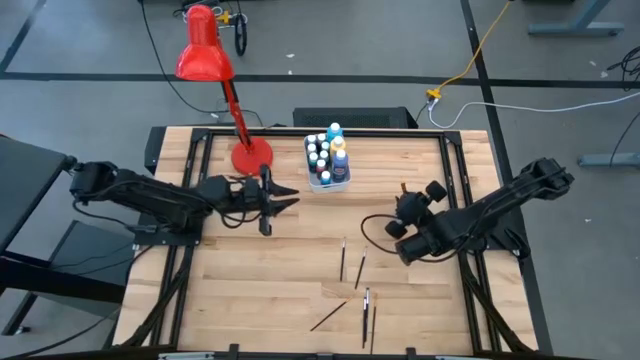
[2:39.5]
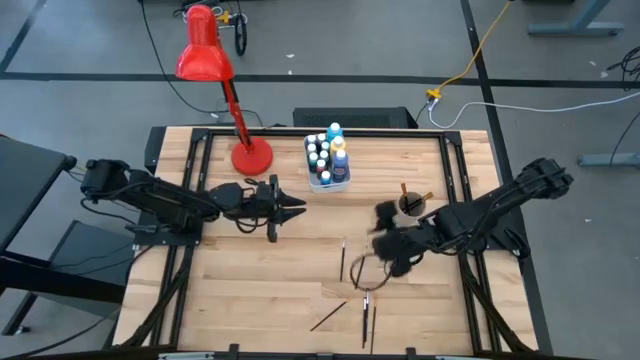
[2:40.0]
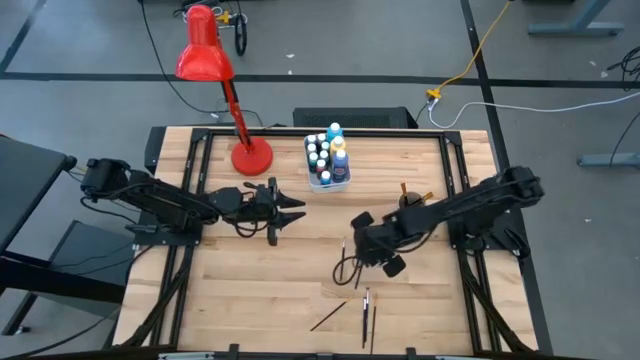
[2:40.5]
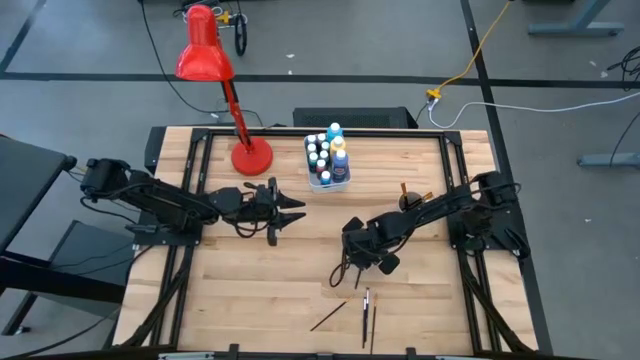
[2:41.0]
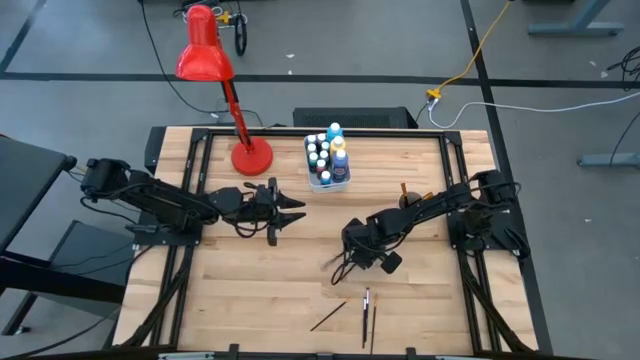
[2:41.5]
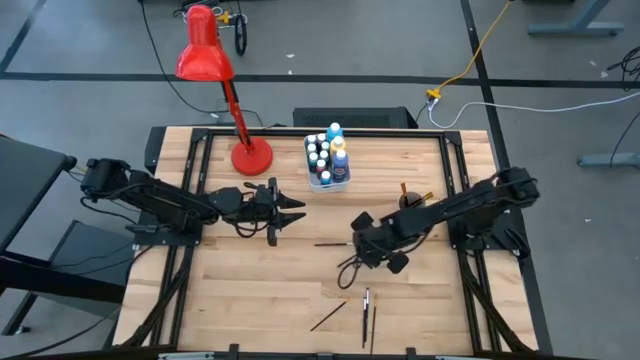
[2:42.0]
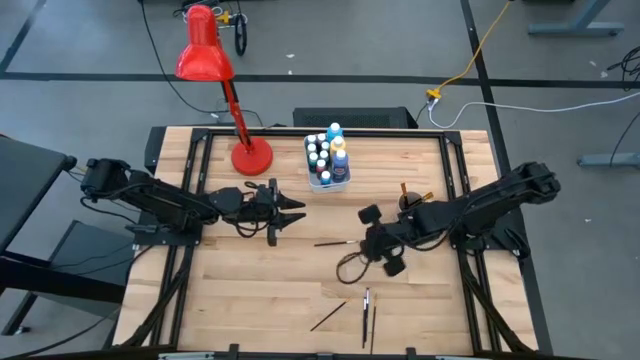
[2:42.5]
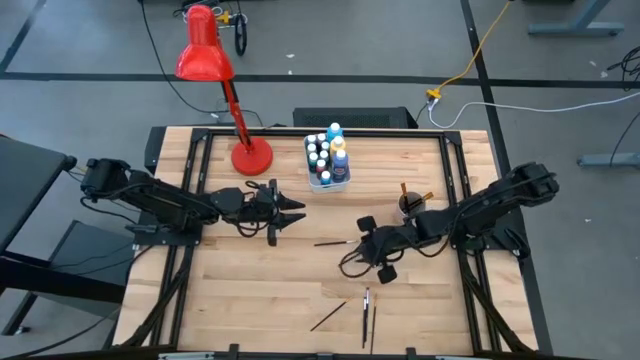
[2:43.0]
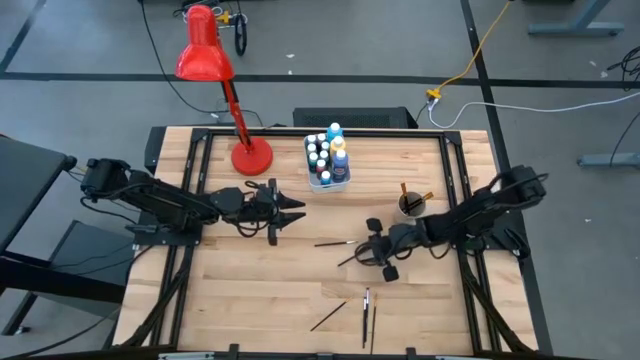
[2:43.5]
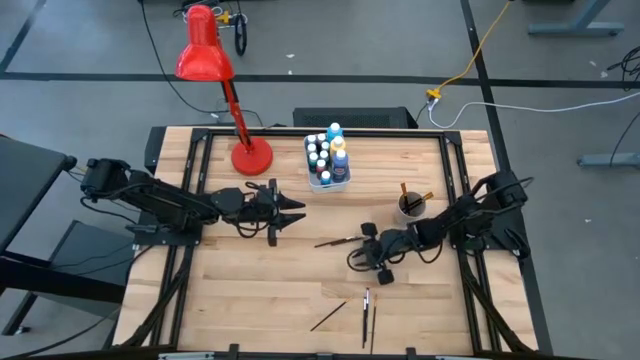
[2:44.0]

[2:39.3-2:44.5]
Task: Pick & Place Paint Supplies
Put the silver paint brush into the gray cup

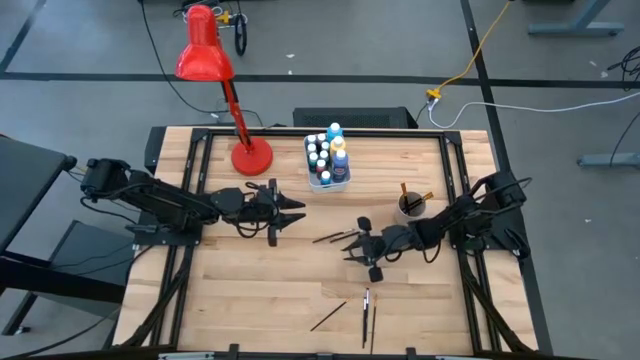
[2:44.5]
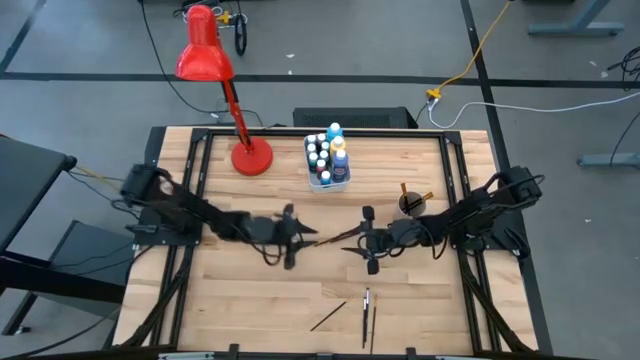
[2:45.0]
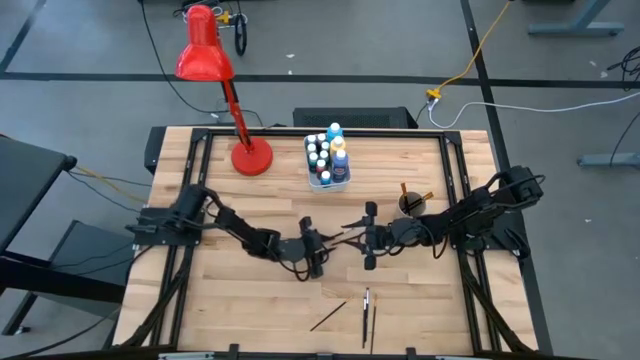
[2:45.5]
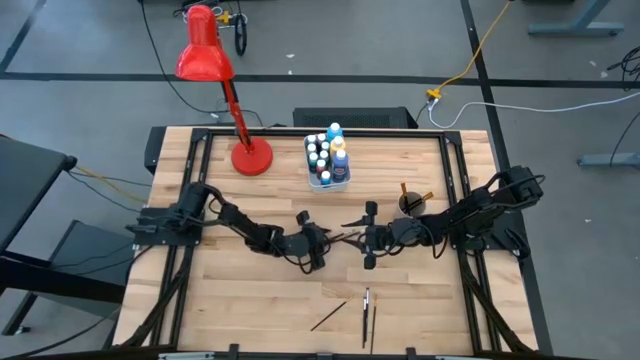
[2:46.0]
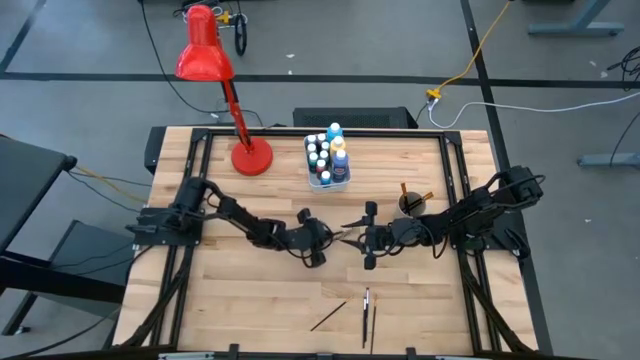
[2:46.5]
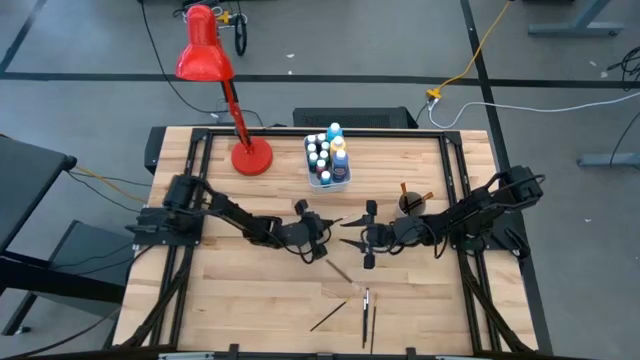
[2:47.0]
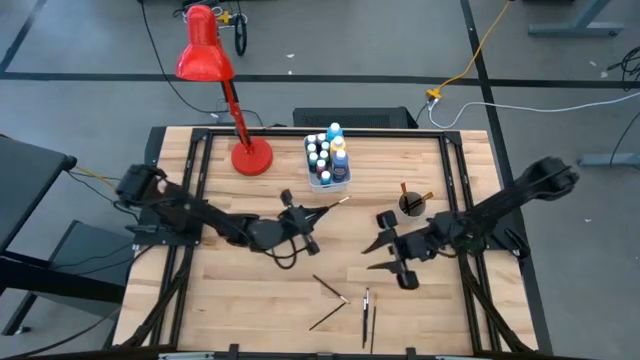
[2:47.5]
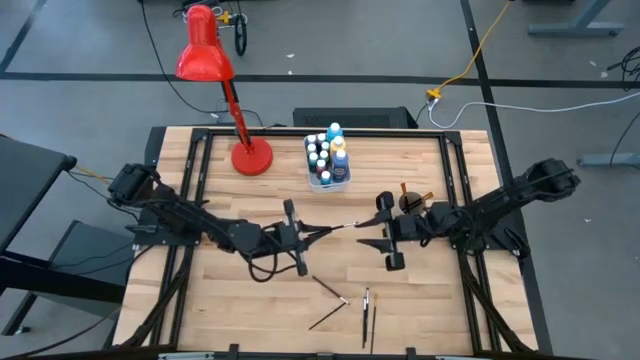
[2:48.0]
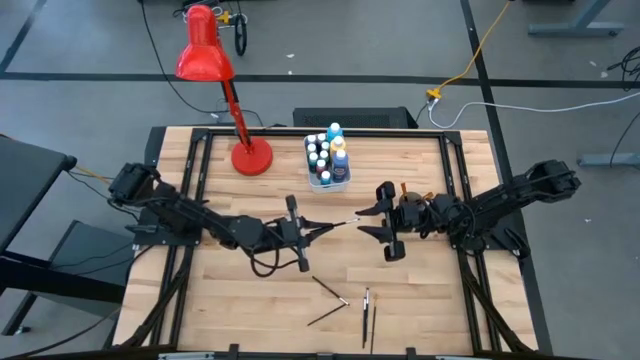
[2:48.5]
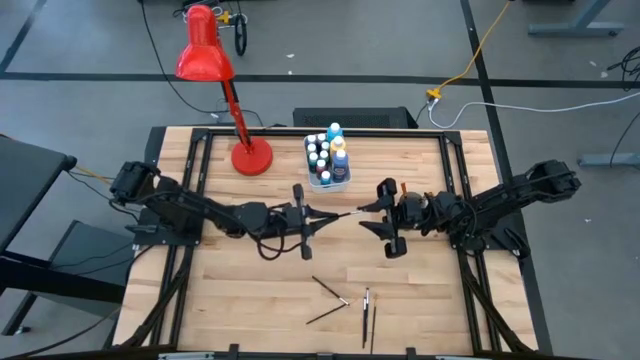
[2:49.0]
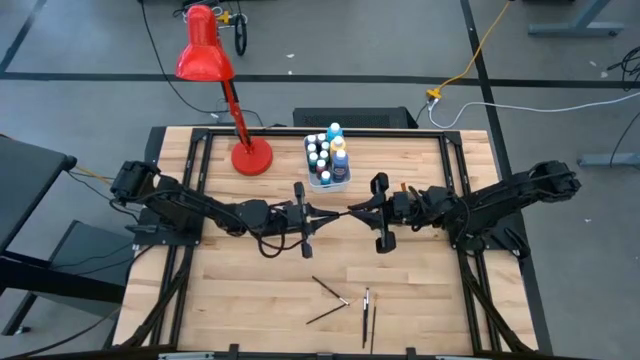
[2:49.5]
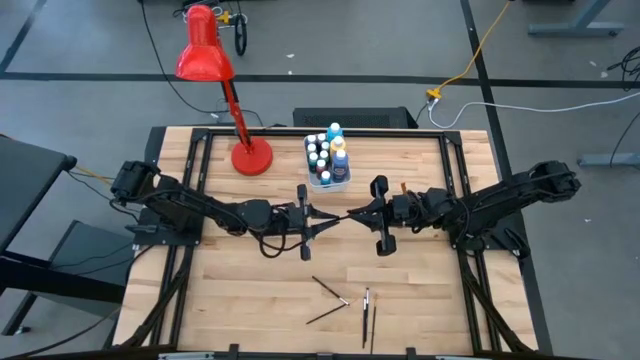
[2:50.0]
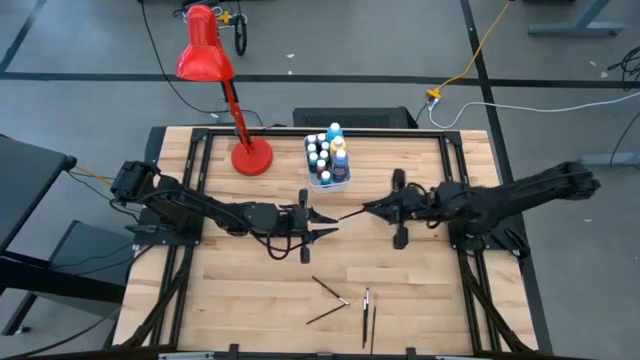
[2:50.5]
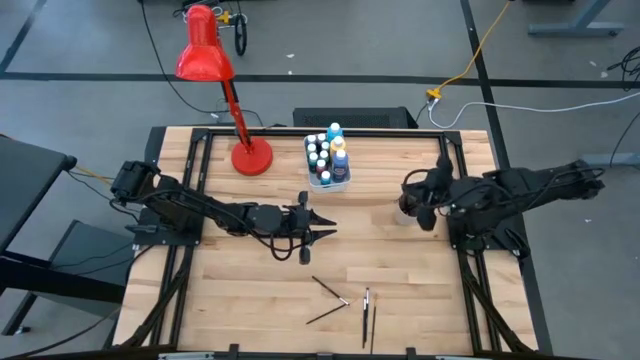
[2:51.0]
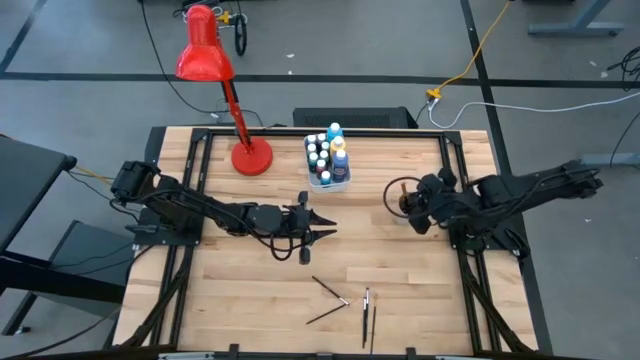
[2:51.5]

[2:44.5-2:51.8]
Put the silver paint brush into the gray cup

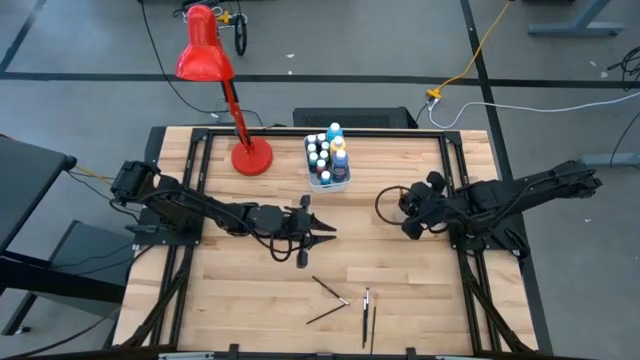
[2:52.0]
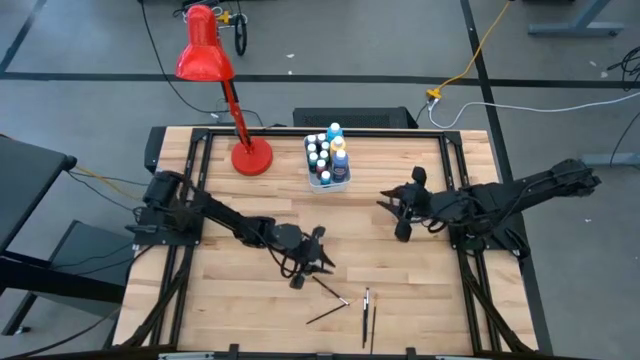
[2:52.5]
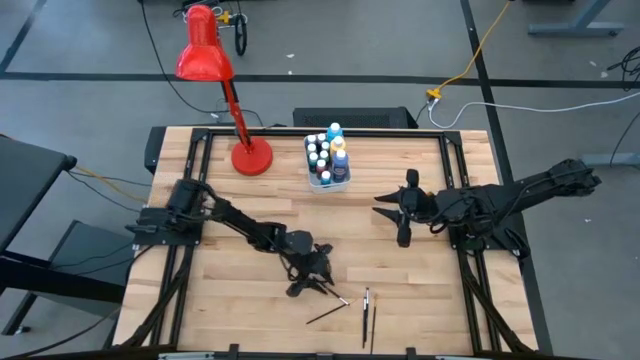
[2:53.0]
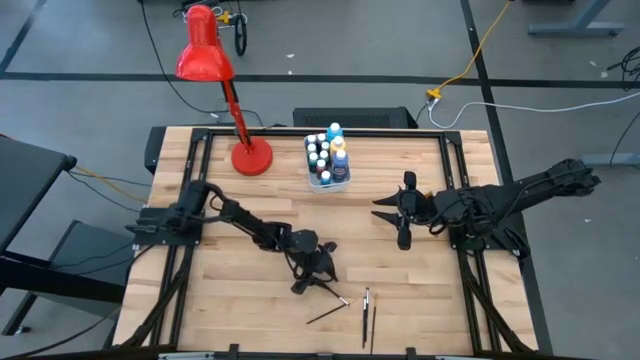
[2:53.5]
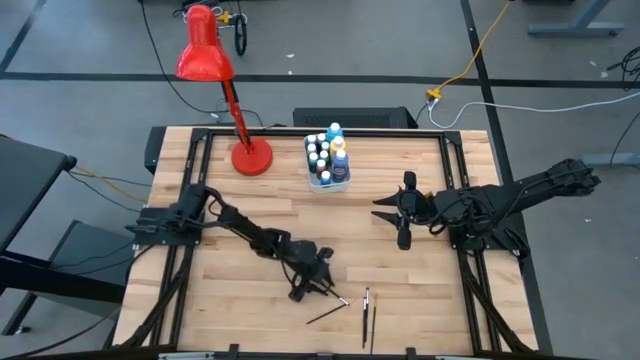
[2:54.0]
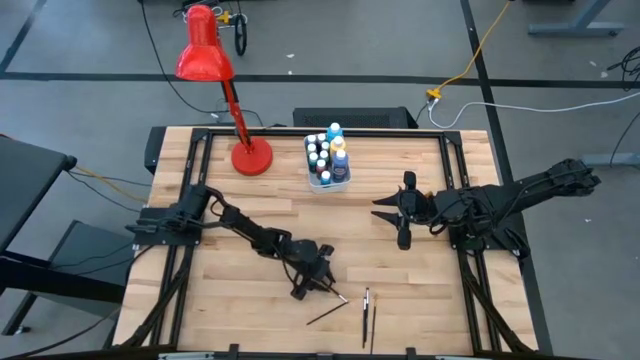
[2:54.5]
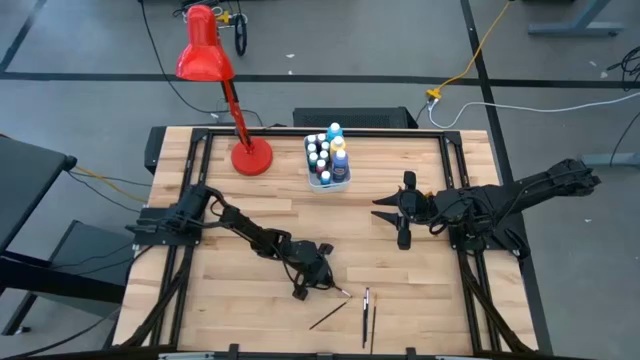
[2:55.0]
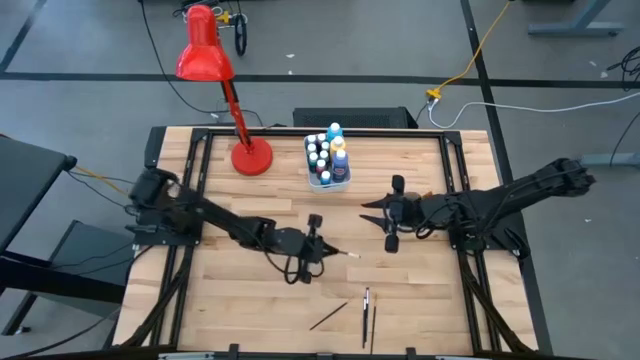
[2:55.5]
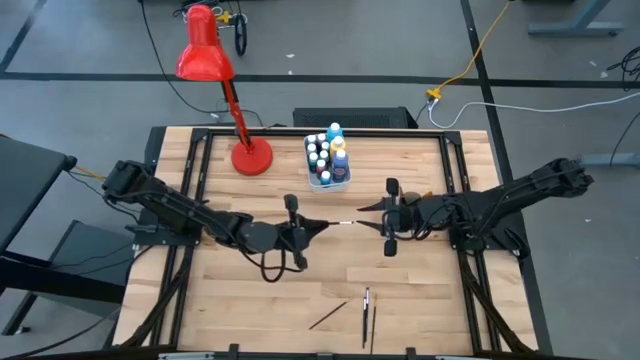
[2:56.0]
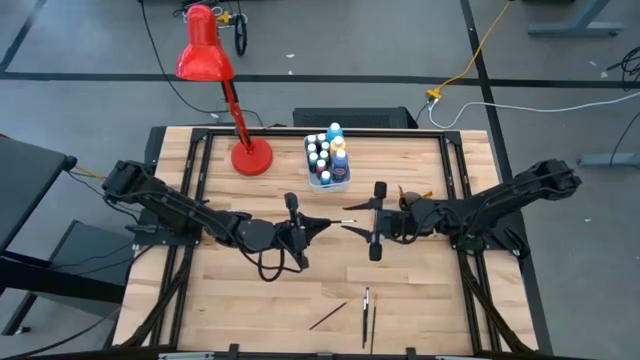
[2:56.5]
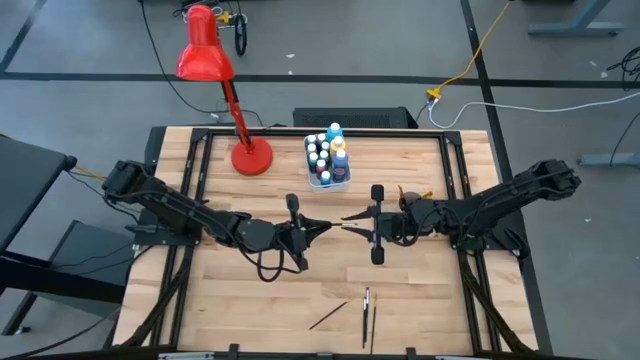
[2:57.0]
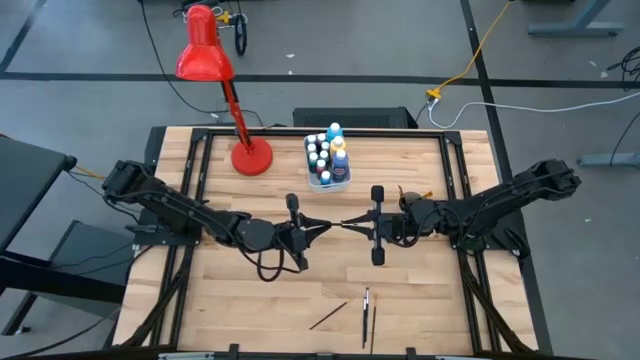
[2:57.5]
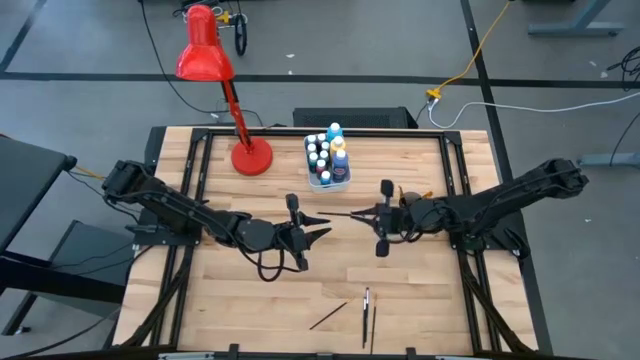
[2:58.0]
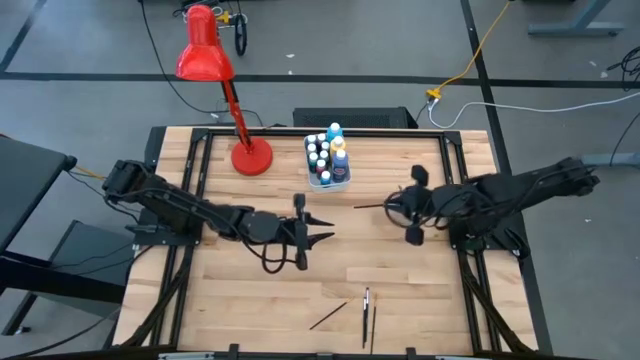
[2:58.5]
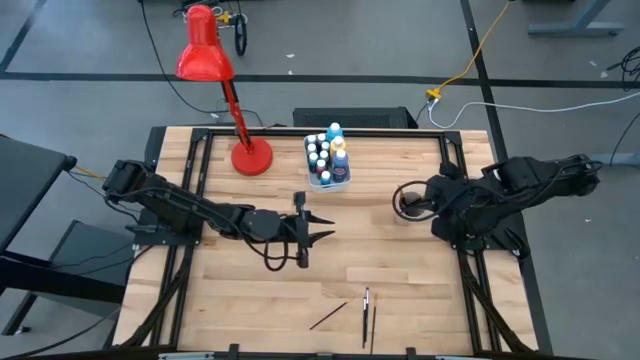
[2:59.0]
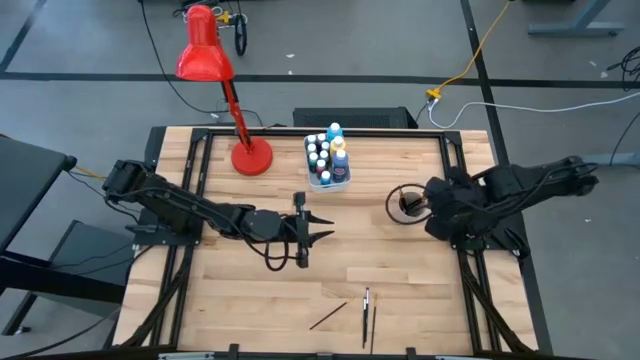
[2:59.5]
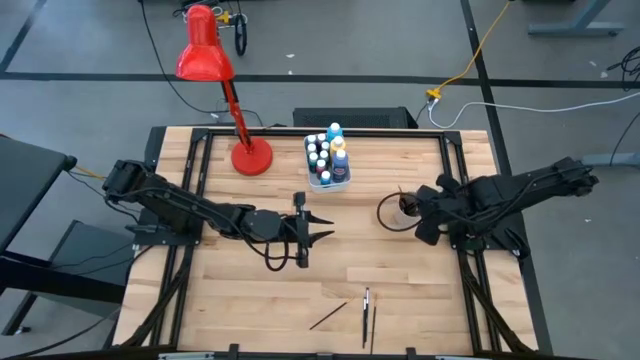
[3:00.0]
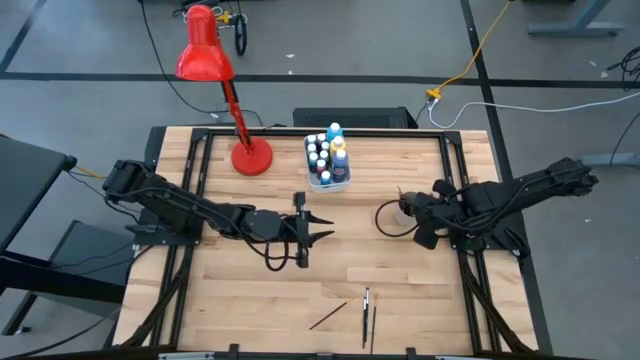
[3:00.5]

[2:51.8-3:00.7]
Put the silver paint brush into the gray cup
